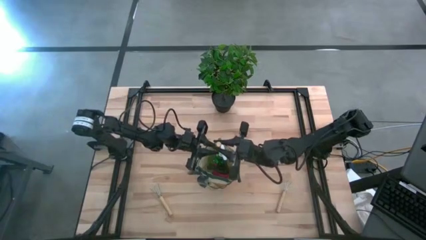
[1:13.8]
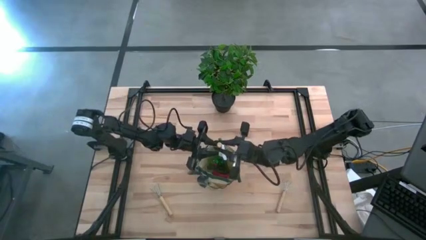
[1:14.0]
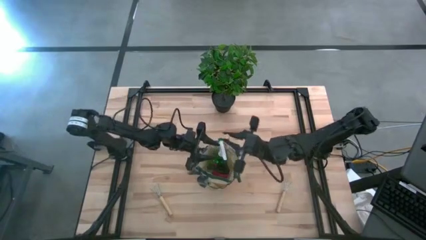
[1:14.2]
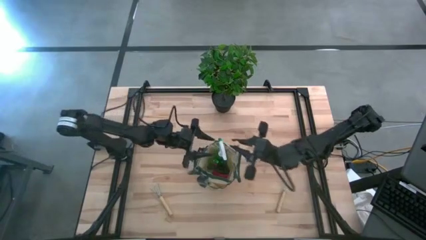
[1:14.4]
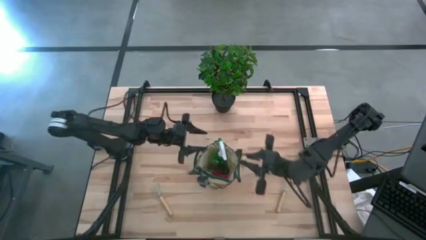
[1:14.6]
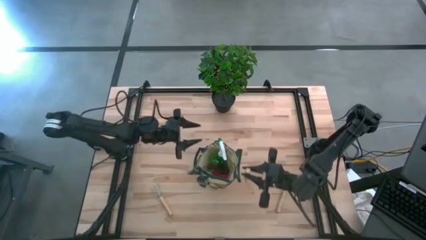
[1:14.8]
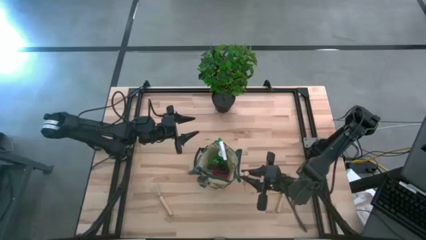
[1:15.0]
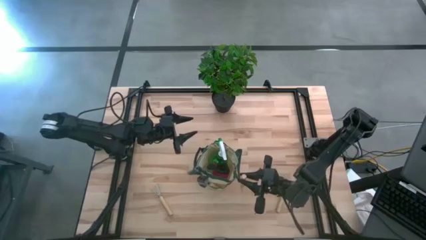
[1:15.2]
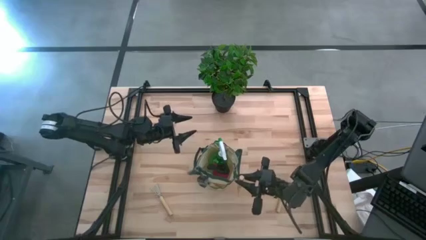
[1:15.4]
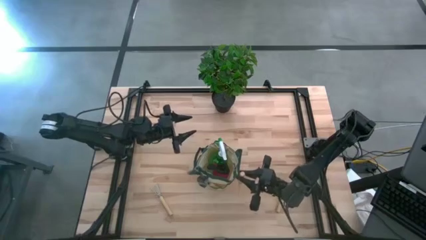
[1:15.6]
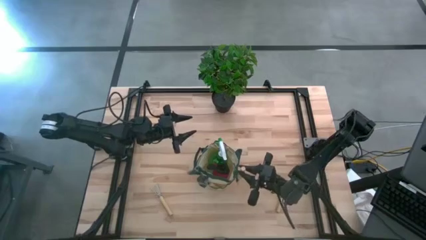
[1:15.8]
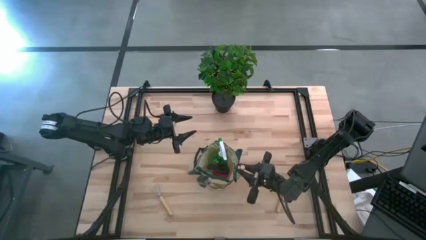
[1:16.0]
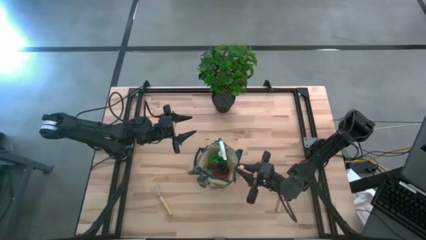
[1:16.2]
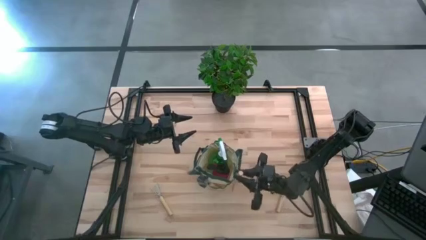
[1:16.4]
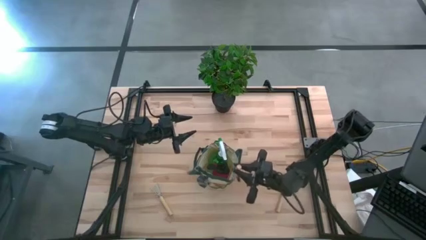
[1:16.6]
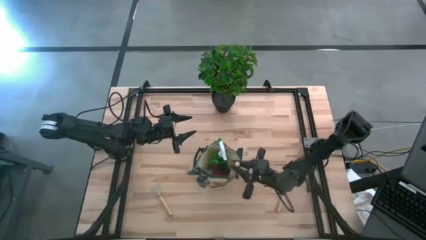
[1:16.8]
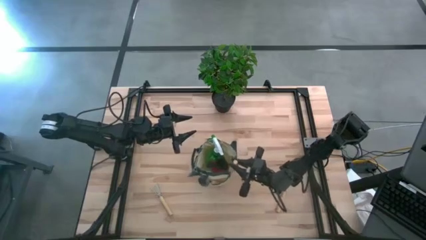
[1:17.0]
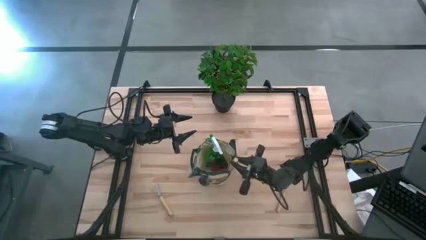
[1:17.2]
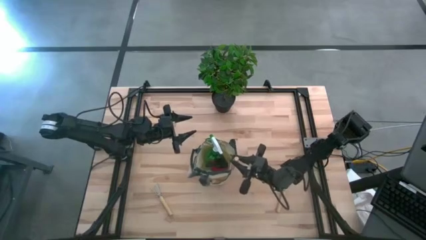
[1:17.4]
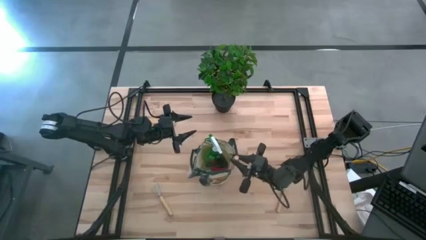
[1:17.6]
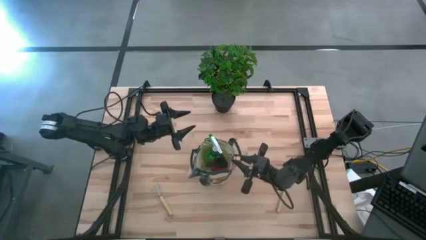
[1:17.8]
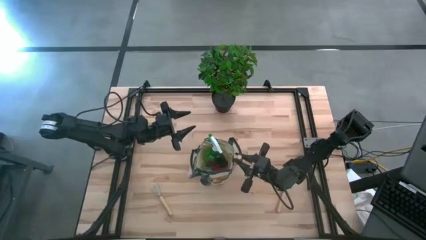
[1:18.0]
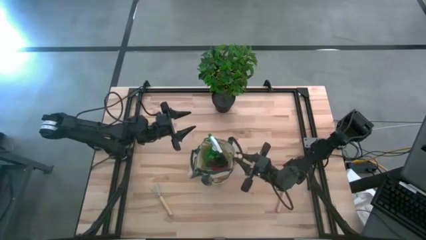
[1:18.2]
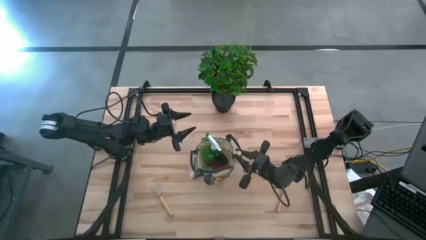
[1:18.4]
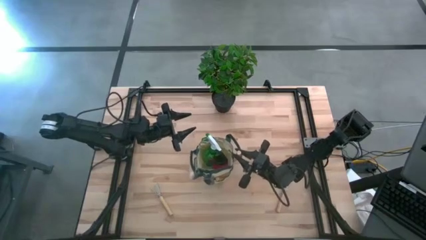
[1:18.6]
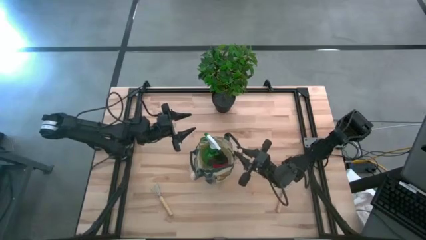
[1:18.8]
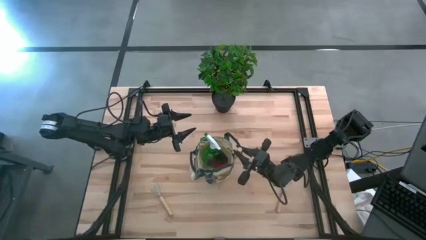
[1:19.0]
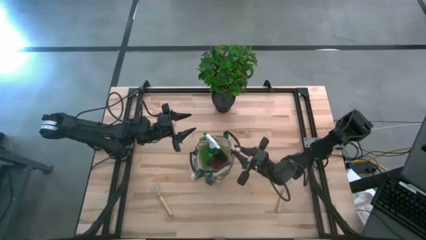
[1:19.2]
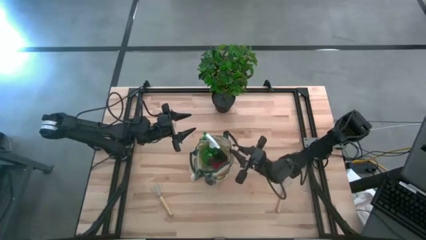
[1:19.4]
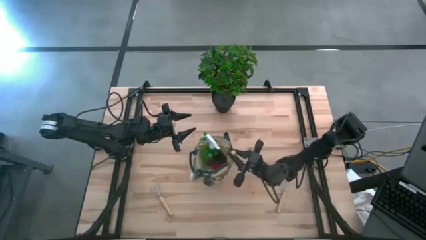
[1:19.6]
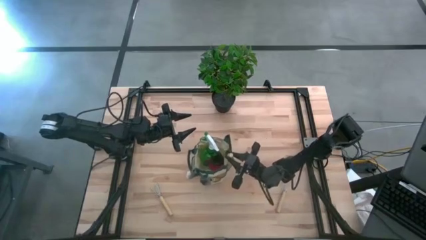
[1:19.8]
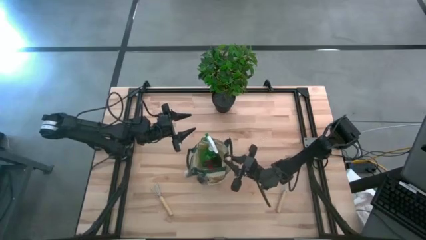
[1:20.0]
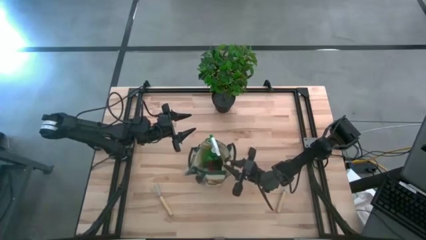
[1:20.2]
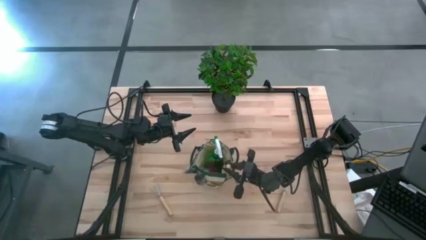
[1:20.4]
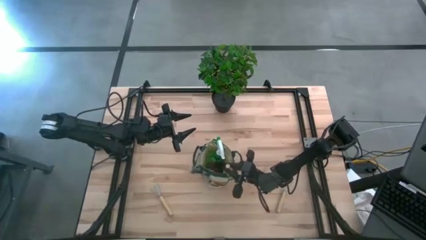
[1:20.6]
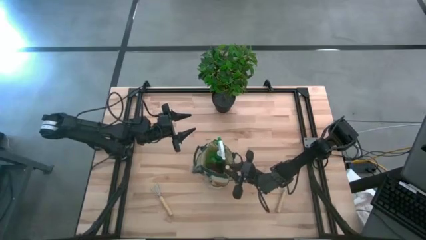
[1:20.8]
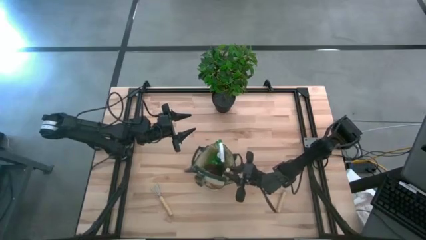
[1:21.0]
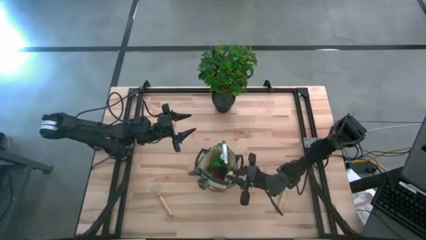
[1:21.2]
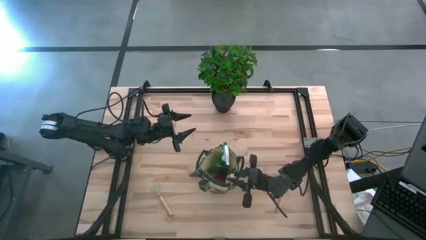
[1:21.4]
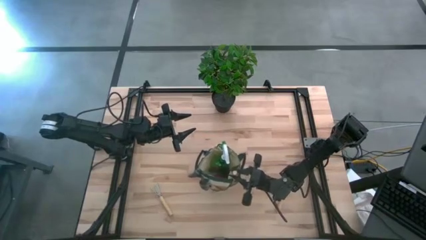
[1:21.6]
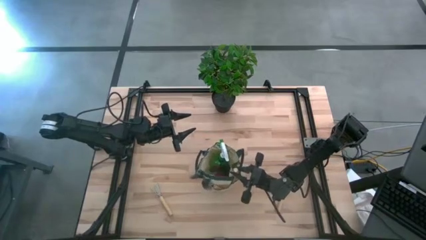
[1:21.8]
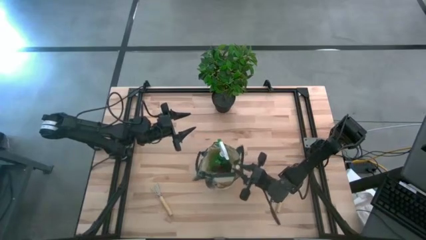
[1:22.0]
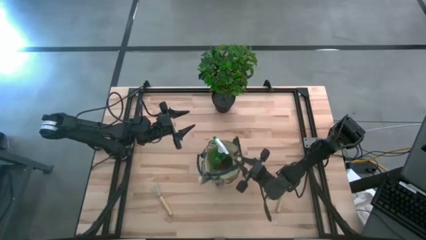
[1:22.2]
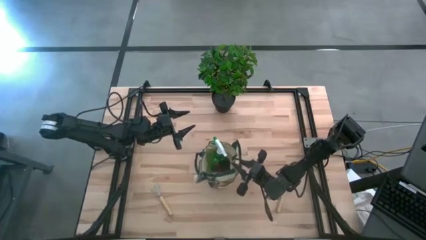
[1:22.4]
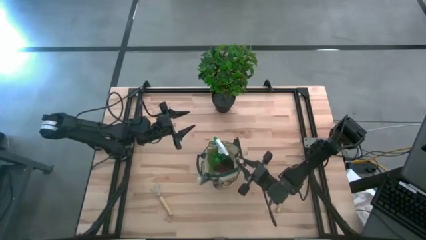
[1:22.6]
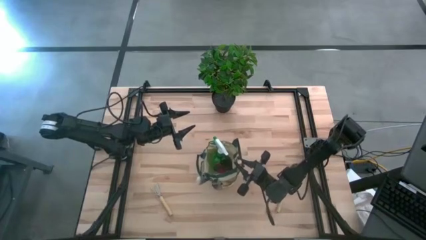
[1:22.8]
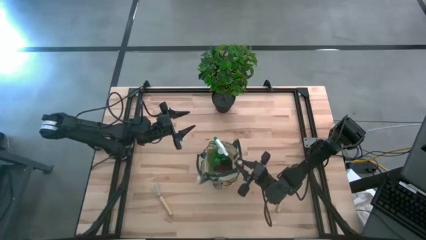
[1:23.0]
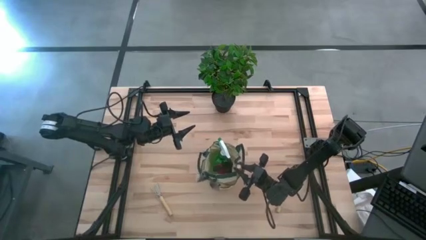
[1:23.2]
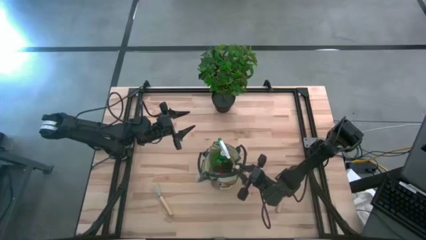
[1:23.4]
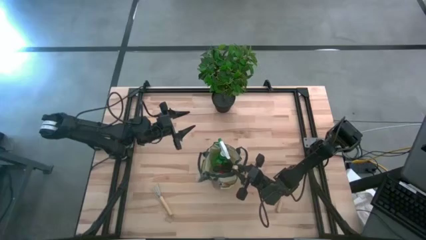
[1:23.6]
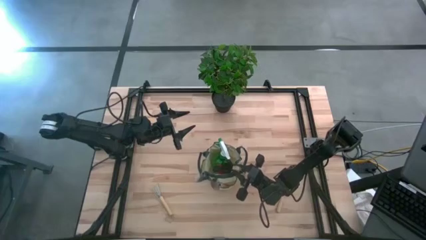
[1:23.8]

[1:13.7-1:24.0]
Task: Pick & Place Garden tools in Gardening bag
Put the brown trowel into the green gardening bag

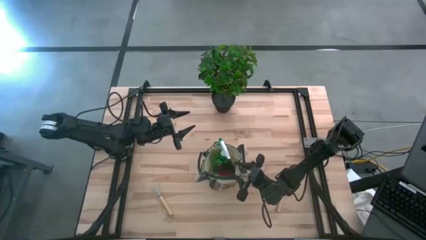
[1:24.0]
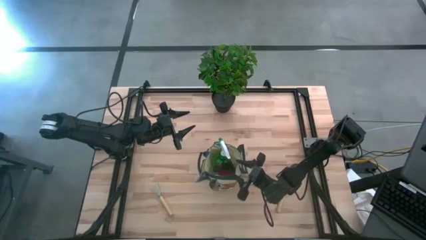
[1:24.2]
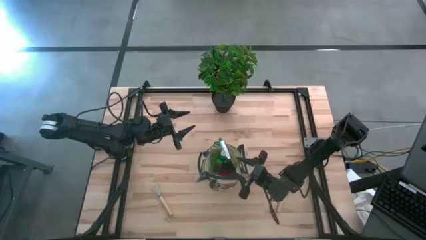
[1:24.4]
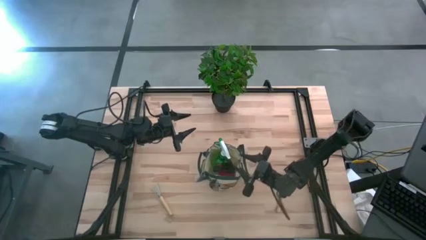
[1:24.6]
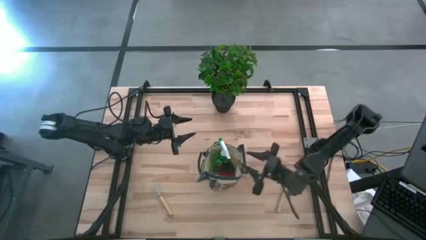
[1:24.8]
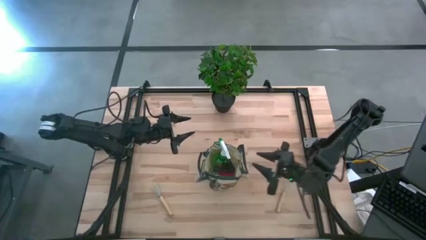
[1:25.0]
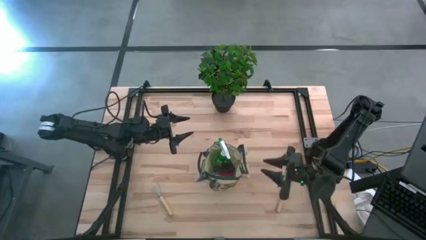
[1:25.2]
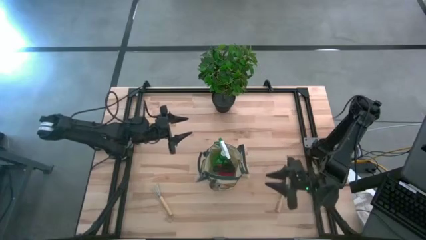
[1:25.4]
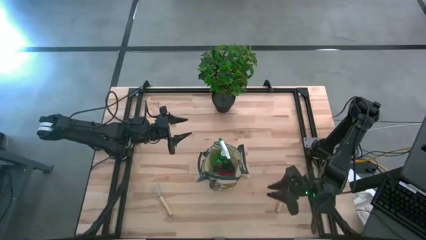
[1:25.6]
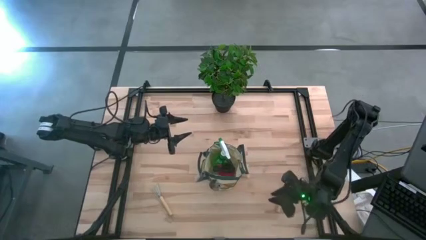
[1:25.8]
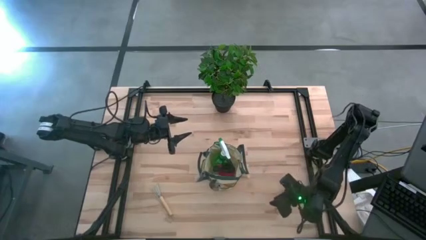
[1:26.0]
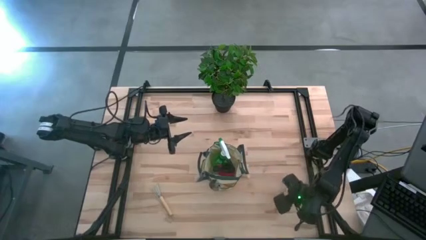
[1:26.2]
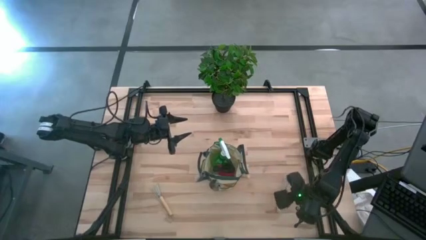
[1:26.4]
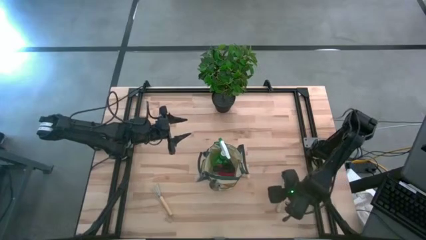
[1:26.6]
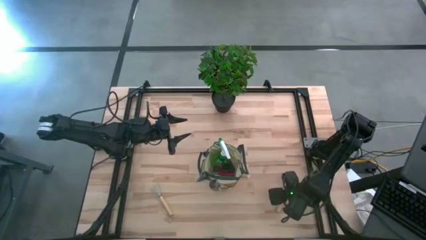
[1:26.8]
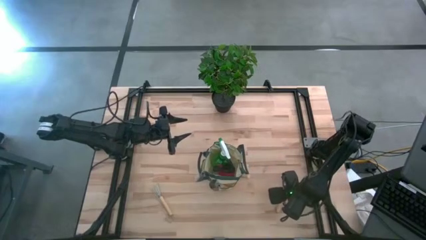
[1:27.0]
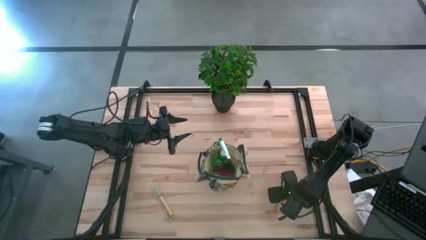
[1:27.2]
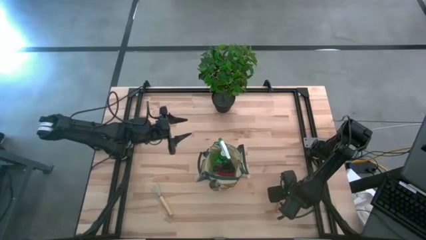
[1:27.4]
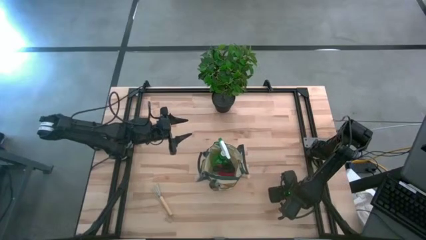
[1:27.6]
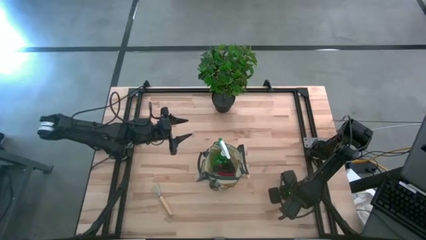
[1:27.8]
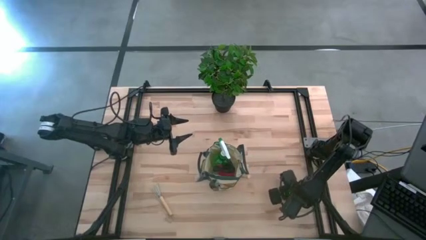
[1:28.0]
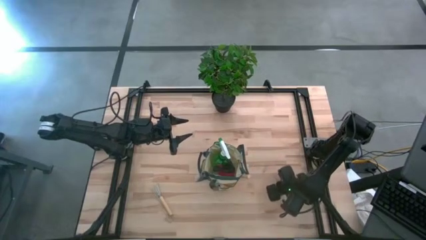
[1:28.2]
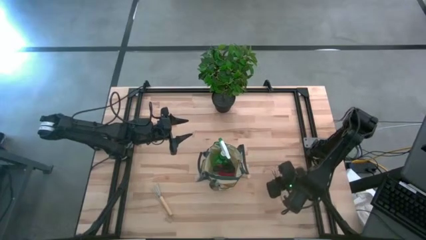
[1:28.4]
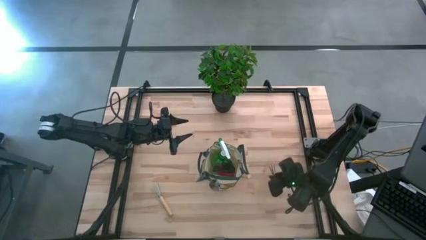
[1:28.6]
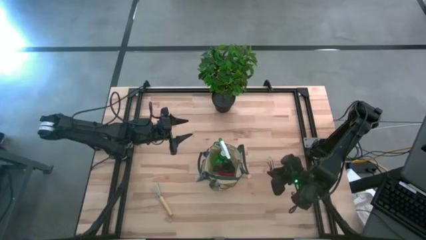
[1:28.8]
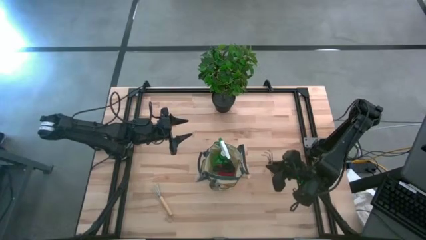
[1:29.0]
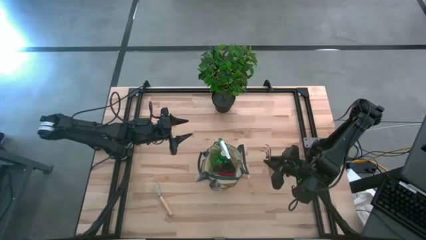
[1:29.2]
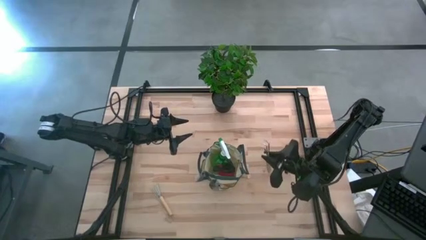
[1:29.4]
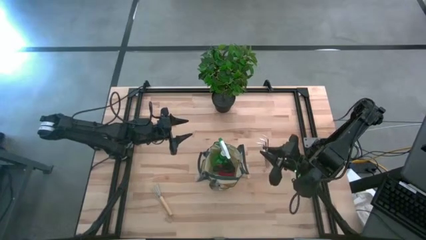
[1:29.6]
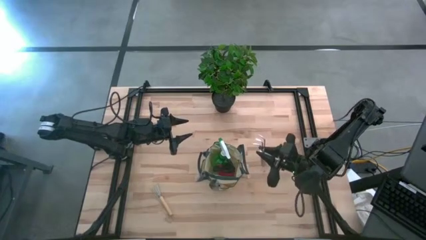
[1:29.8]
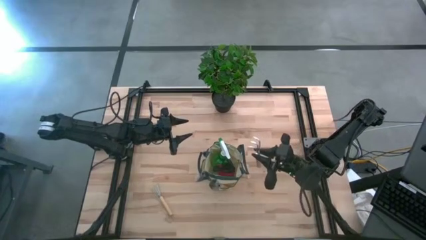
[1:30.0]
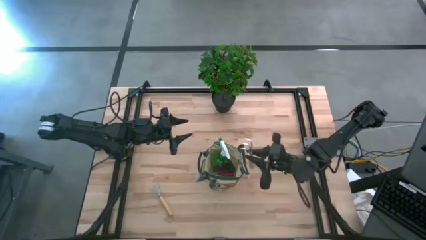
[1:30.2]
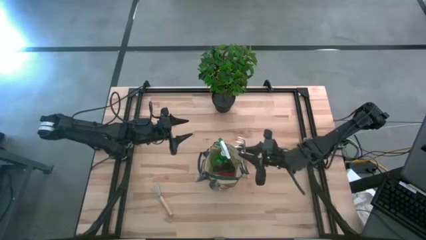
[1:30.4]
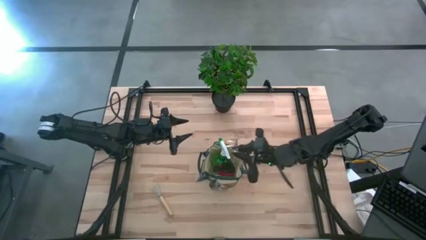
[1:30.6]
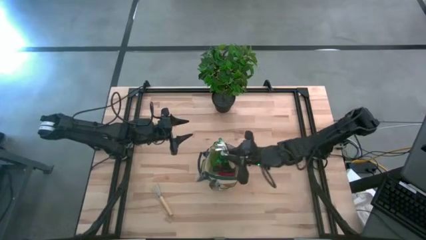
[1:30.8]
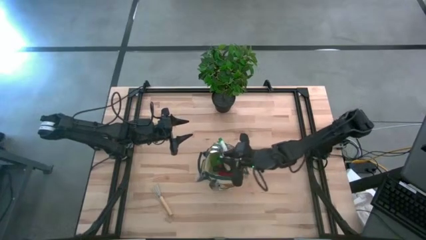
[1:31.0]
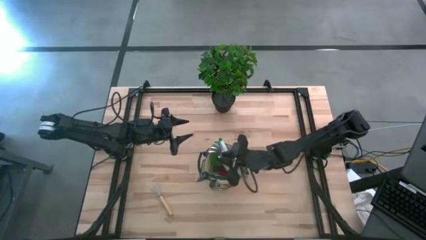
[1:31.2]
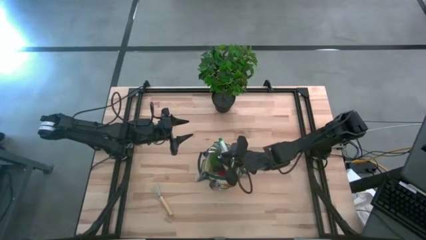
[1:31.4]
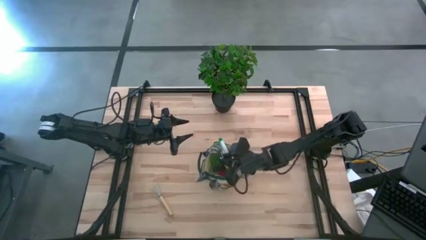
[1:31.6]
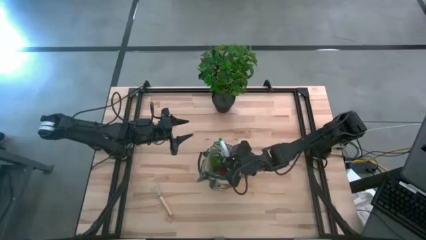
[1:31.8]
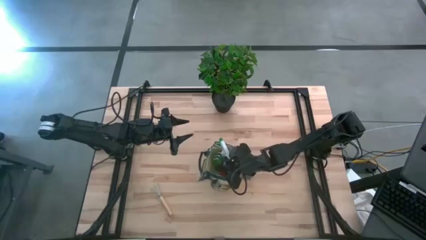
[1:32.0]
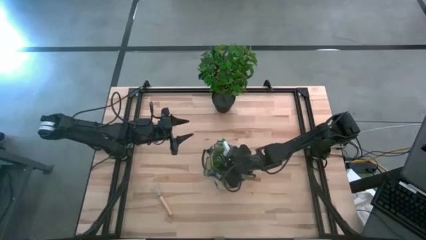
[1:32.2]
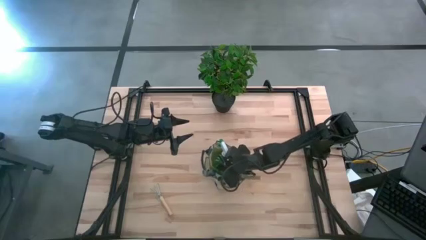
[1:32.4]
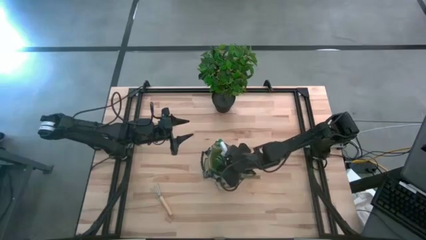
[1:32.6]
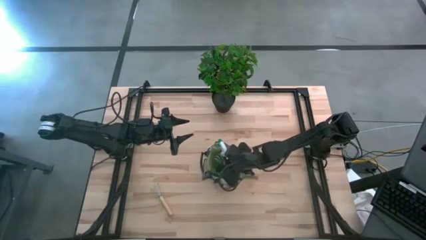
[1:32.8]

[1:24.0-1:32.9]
Put the right brown hand rake into the green gardening bag
